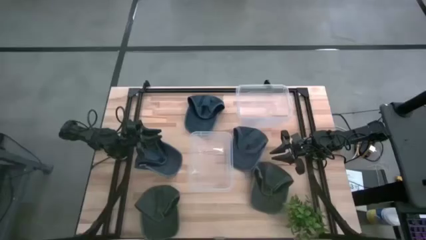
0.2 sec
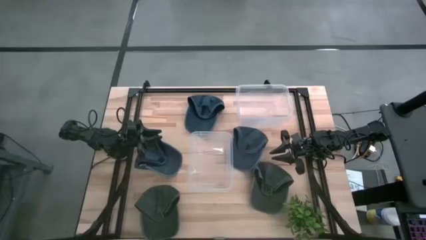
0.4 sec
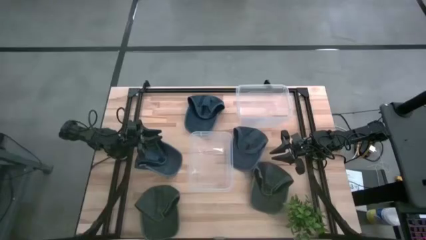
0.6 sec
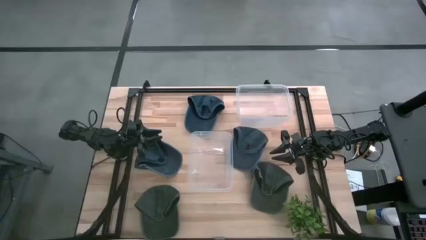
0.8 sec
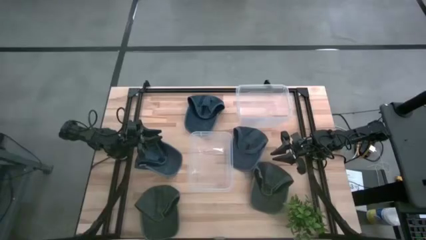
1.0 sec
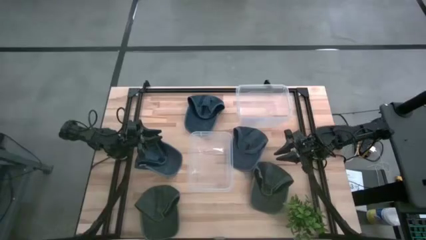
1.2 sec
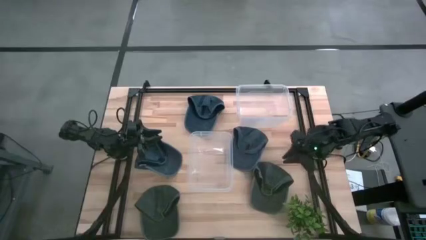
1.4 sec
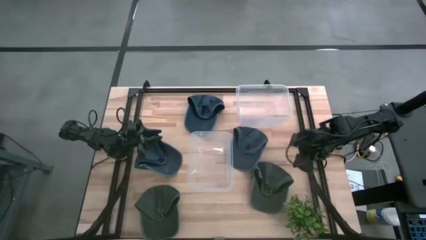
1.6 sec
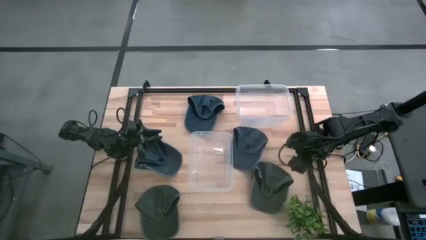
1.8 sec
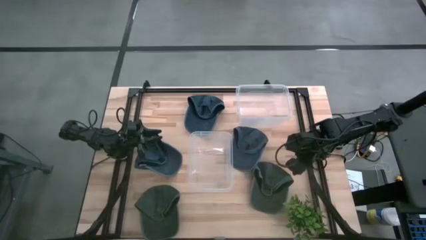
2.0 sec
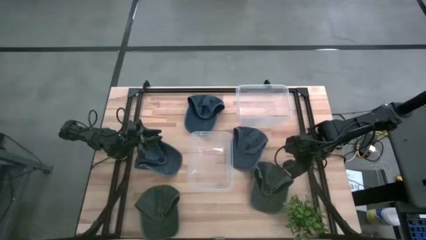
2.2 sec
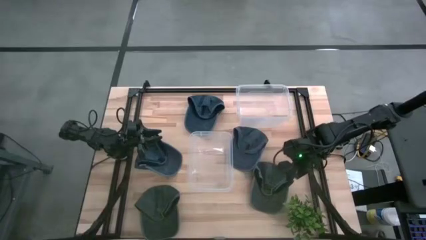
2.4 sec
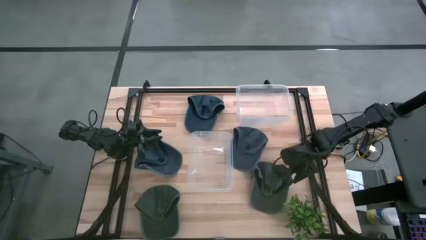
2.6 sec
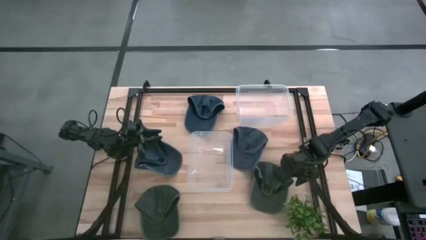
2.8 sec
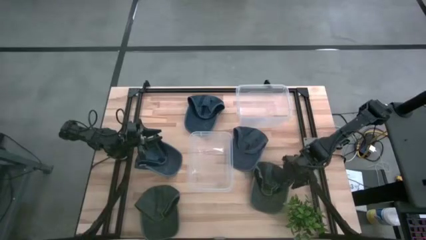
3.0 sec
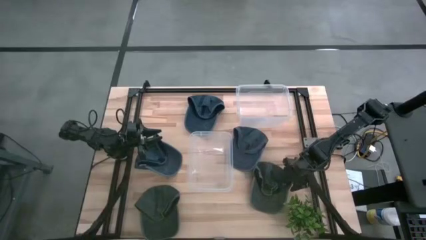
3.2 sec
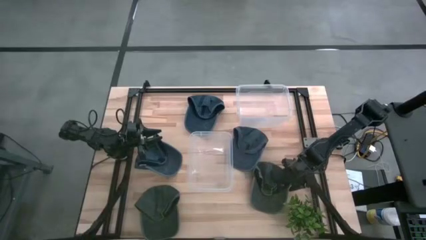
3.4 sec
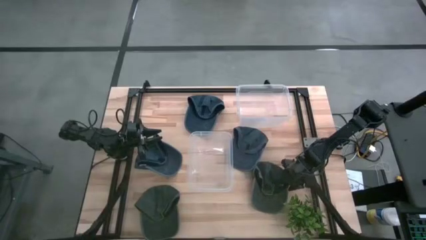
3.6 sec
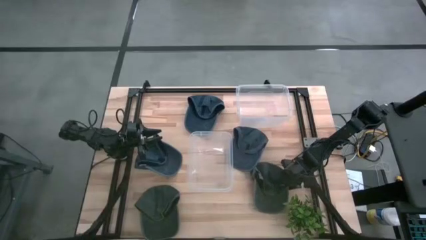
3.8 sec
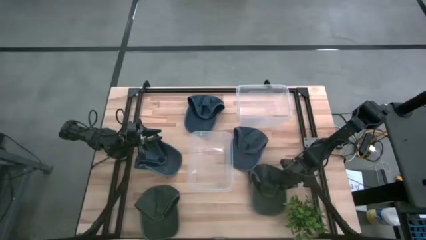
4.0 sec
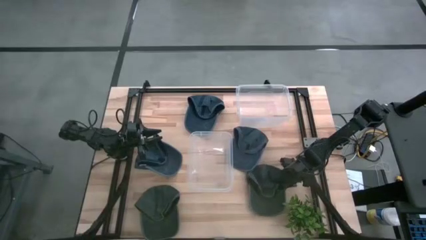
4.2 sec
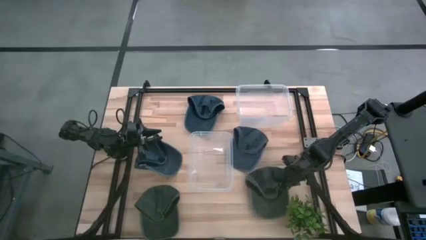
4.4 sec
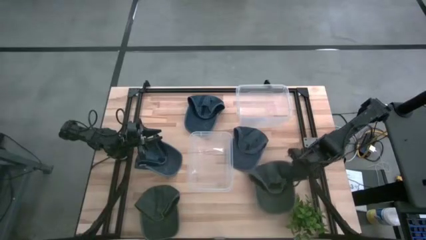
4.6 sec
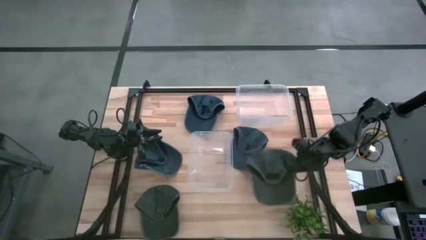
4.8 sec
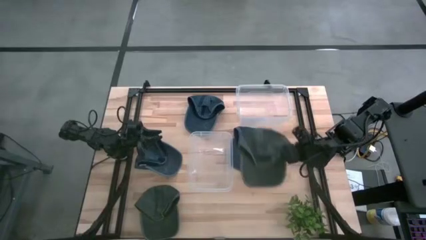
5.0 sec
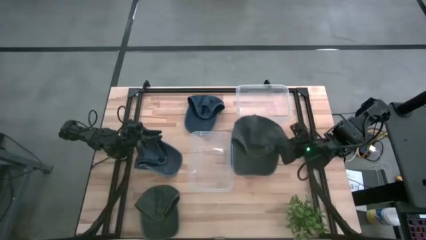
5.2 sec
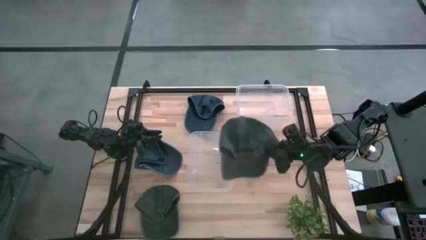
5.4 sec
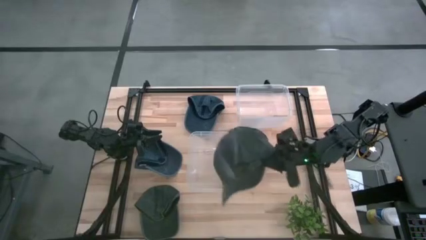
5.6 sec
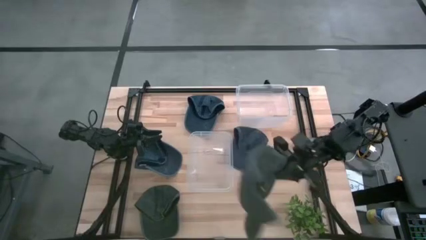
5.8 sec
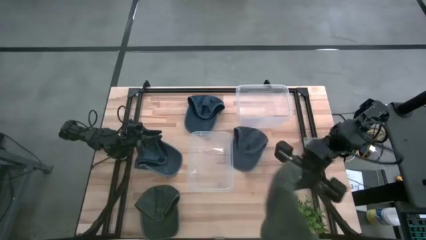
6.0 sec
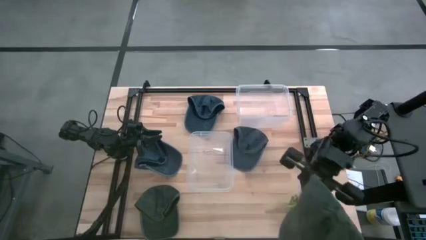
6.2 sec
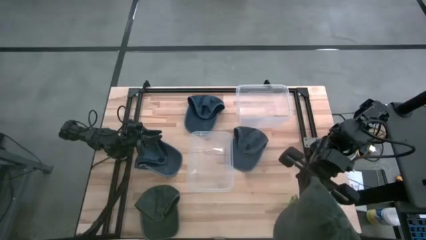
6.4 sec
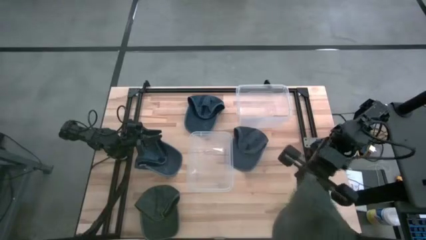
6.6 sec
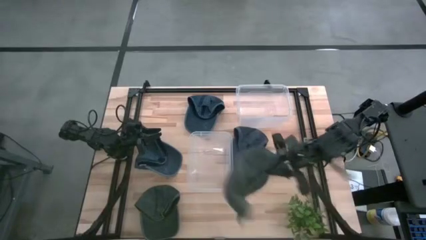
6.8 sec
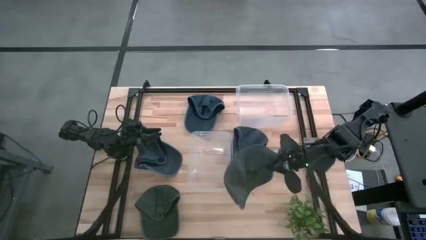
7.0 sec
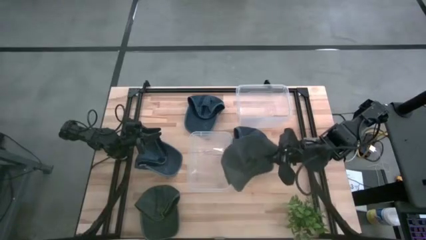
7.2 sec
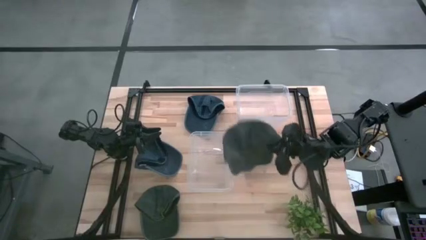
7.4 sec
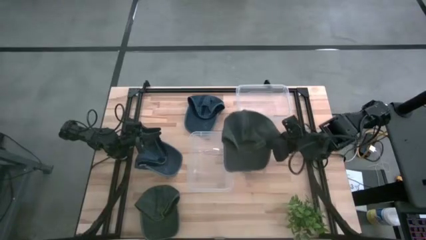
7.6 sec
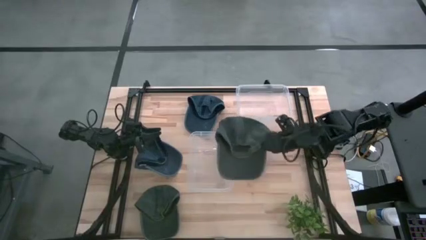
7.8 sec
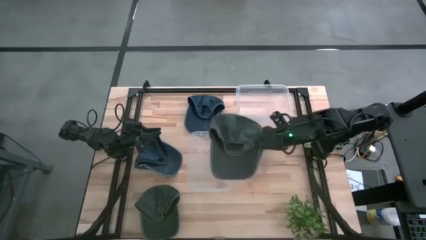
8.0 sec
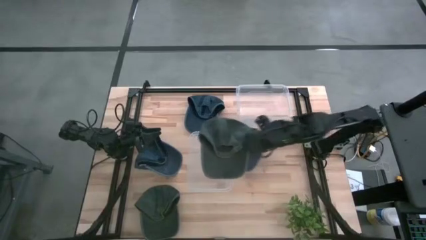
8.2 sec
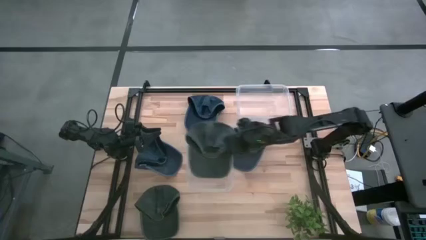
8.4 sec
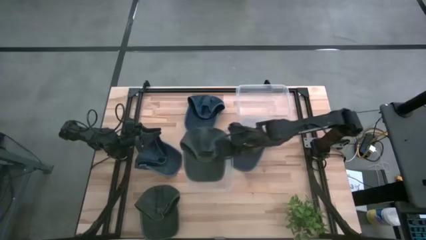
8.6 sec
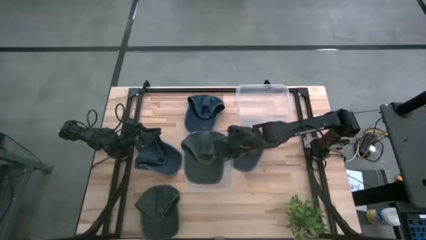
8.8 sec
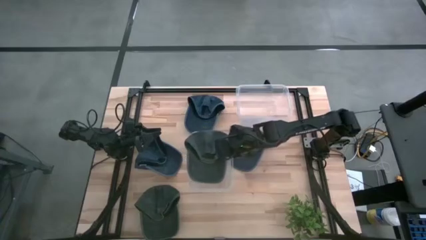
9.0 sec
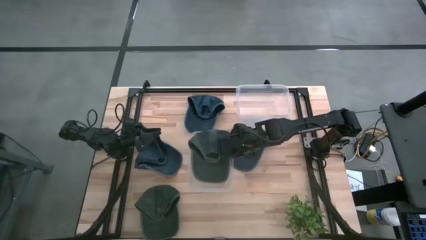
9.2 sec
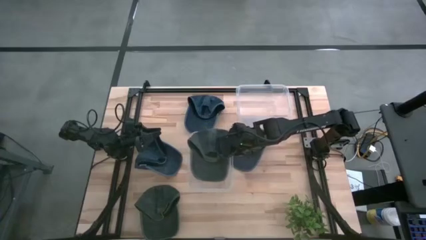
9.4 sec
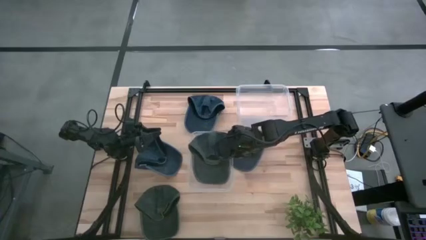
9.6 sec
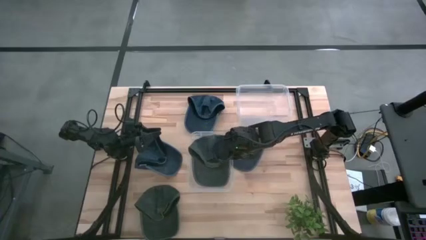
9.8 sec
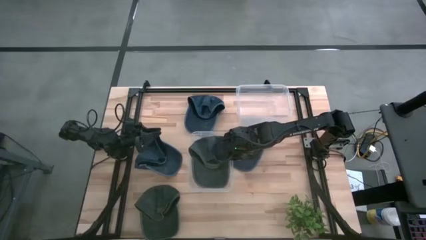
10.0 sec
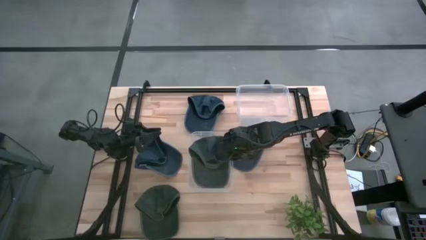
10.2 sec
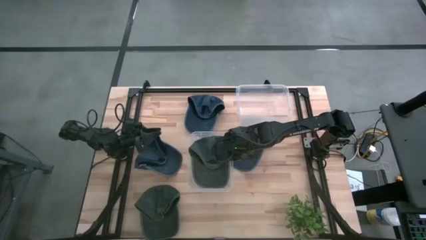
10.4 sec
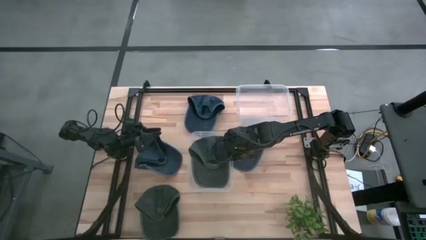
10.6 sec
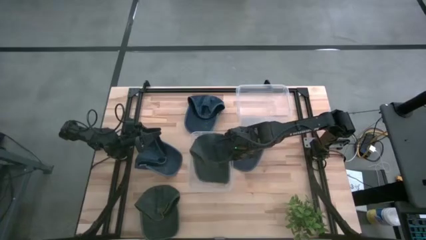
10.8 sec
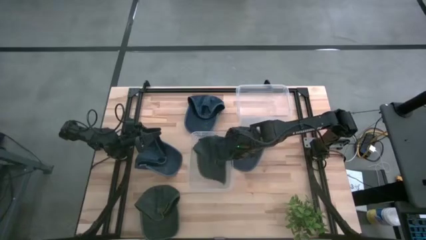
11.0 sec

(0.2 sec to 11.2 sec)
Task: Pick & Place hat
Put the right black cap into the bottom transparent bin
